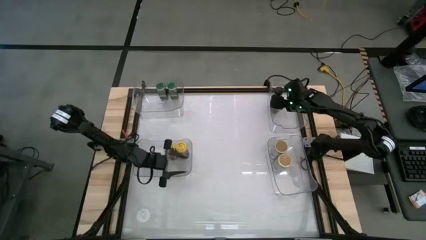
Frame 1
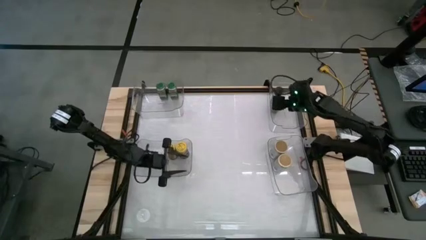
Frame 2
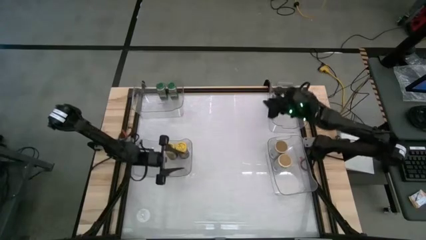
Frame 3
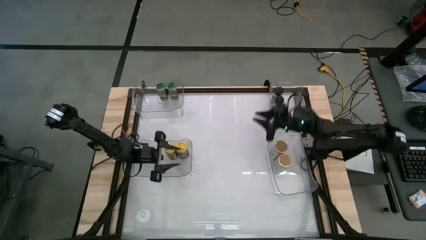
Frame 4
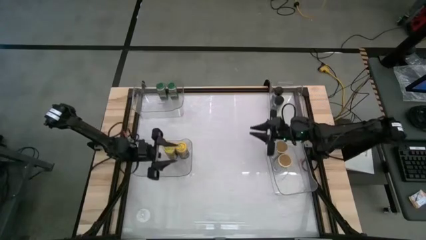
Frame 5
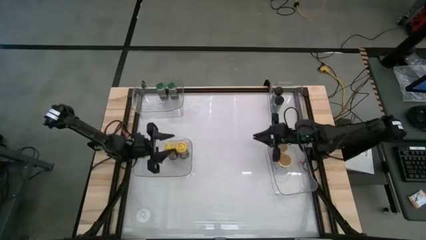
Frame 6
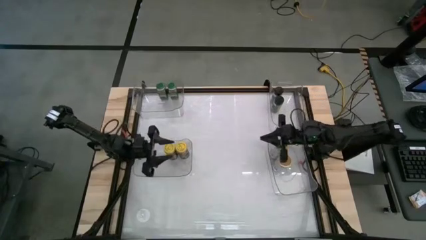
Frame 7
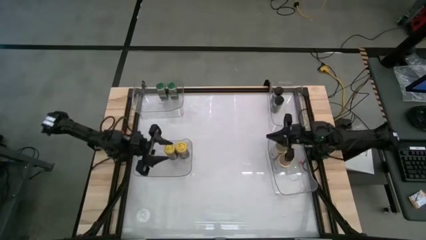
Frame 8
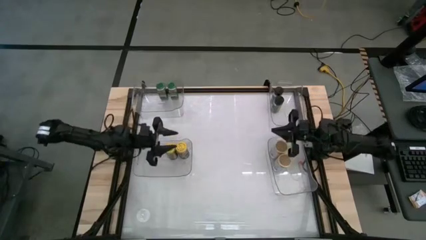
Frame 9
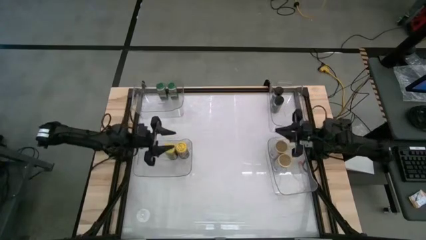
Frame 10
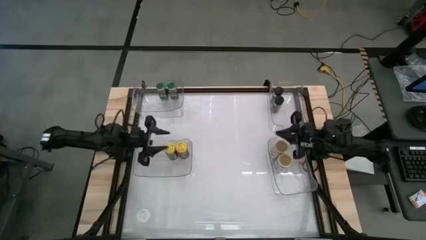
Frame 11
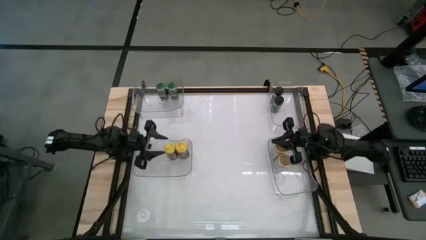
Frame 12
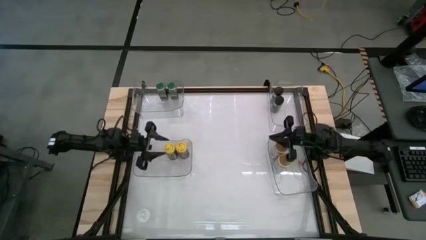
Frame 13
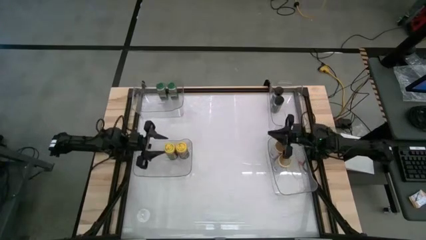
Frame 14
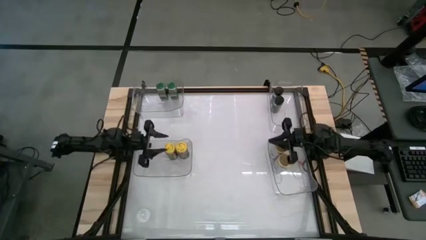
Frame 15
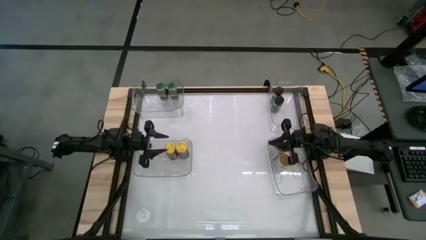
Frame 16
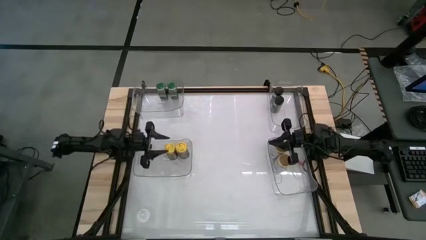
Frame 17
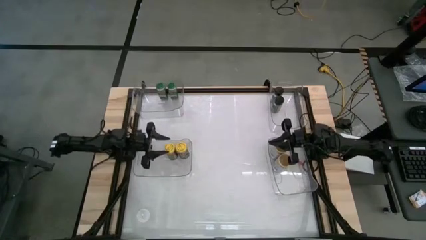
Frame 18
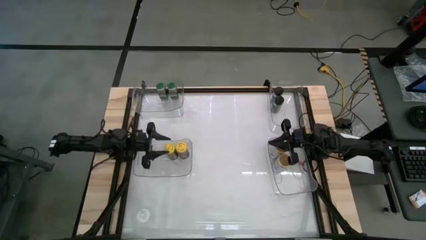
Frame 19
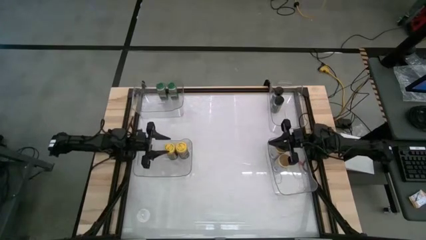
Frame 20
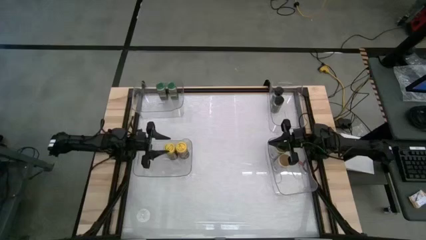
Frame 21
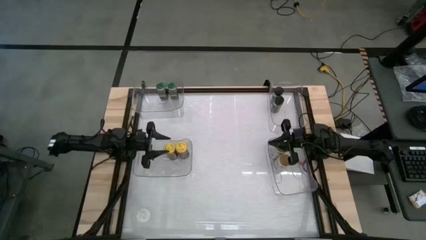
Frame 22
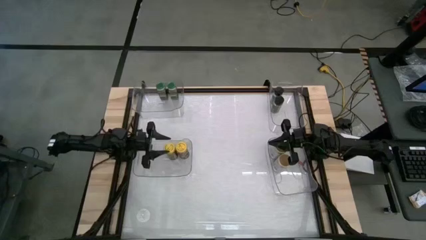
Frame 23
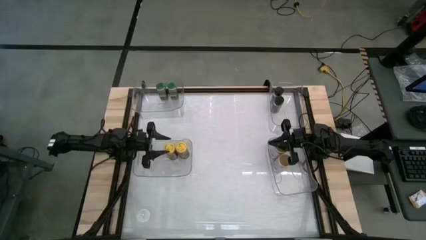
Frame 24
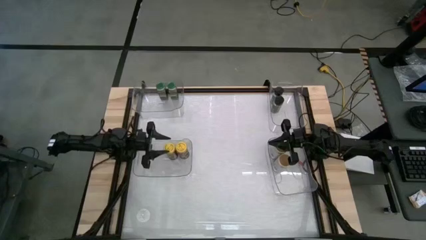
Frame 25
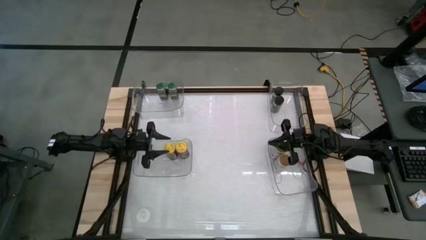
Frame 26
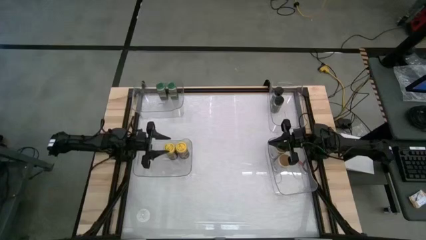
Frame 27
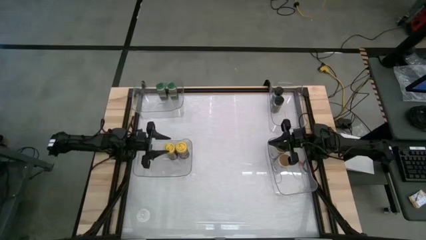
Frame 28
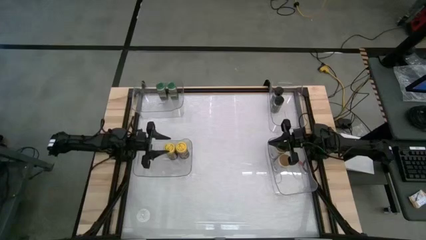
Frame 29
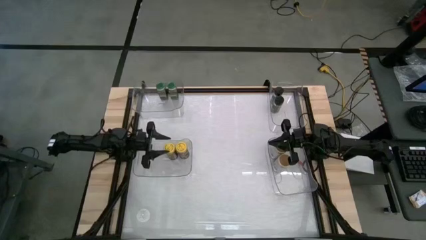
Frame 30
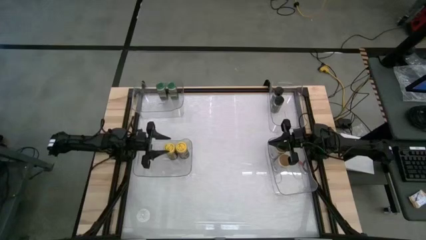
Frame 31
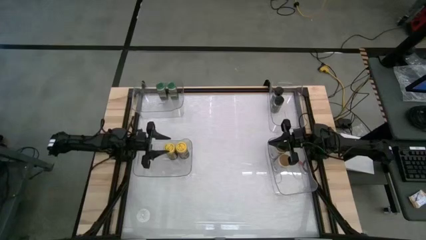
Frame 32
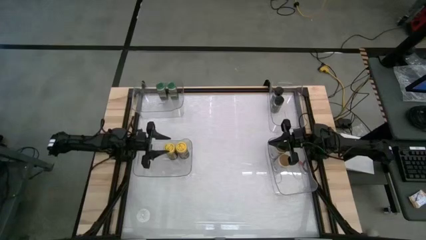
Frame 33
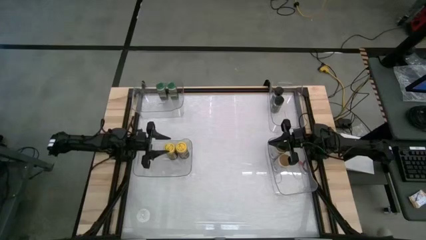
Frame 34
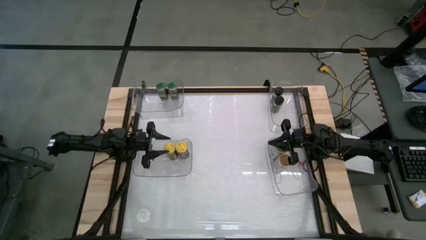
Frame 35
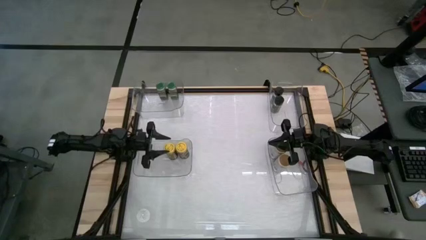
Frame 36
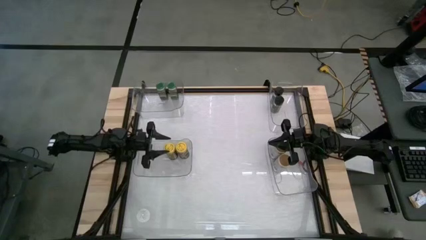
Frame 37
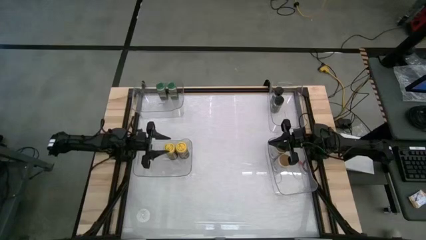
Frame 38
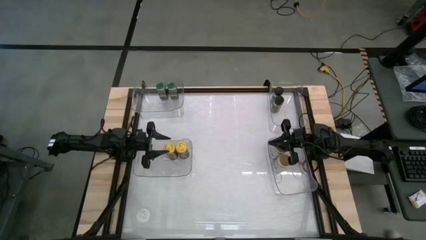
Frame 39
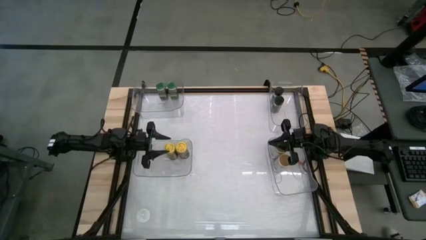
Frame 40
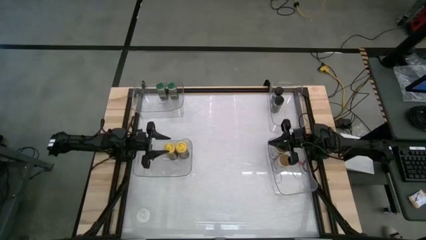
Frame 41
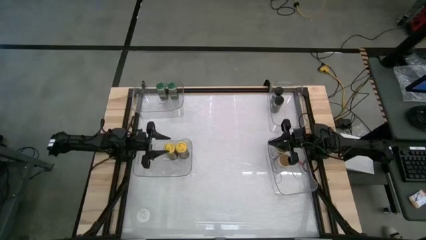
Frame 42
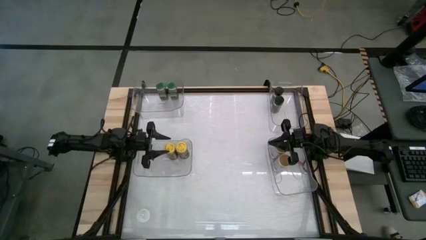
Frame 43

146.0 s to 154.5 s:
Task: Sort spices by type
Return to Home Position

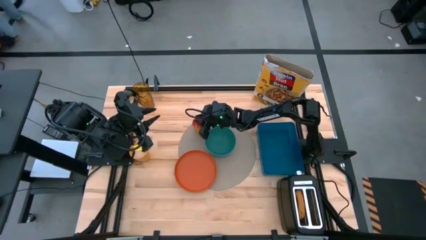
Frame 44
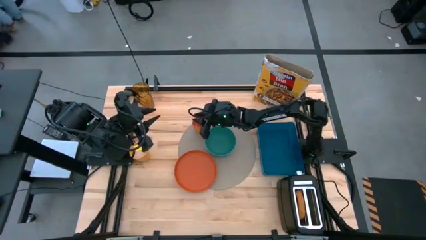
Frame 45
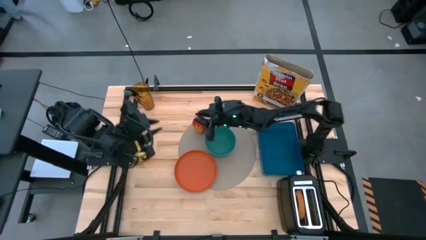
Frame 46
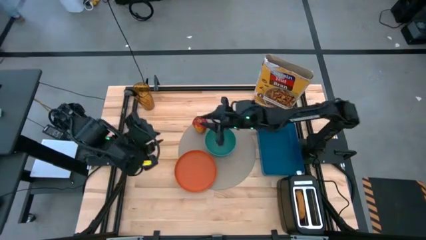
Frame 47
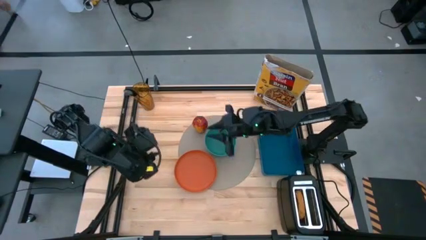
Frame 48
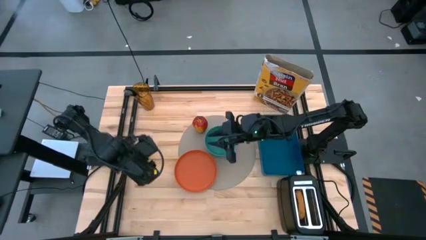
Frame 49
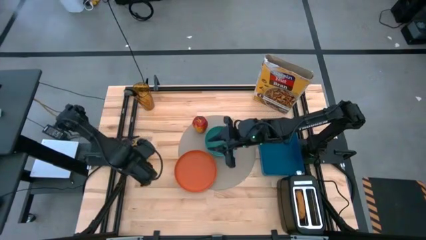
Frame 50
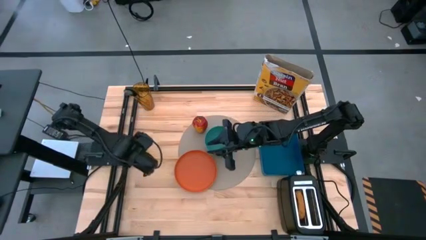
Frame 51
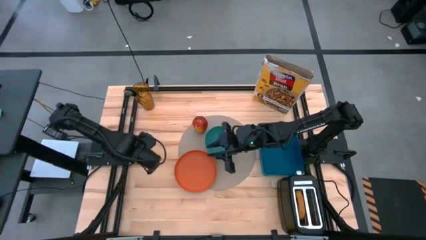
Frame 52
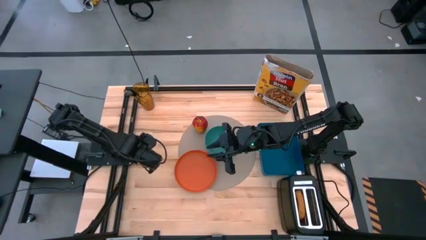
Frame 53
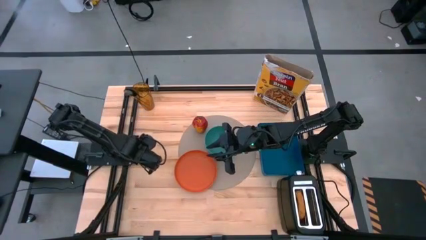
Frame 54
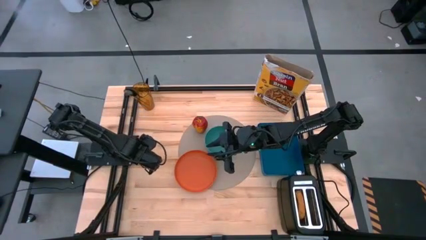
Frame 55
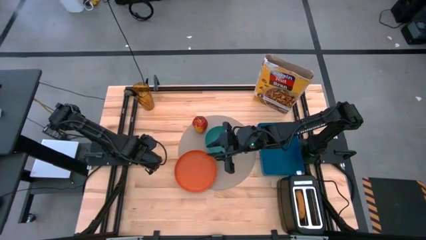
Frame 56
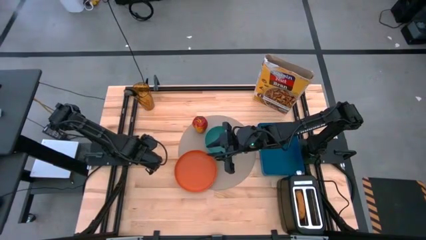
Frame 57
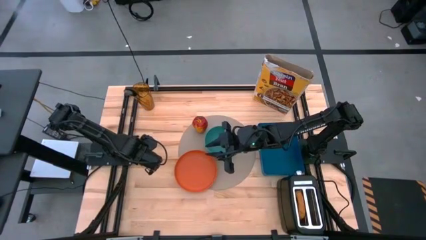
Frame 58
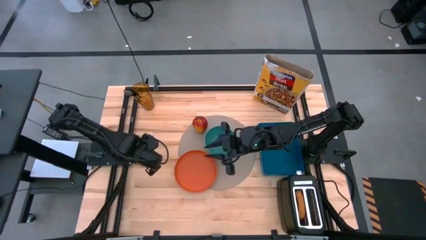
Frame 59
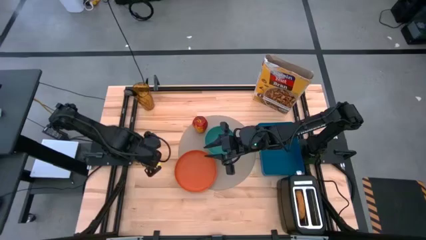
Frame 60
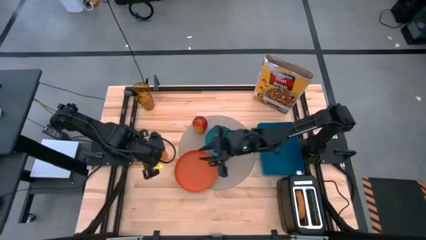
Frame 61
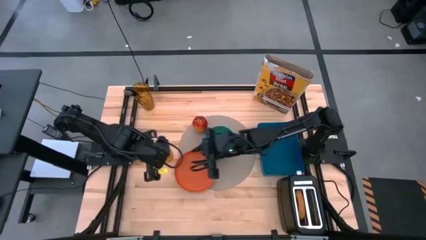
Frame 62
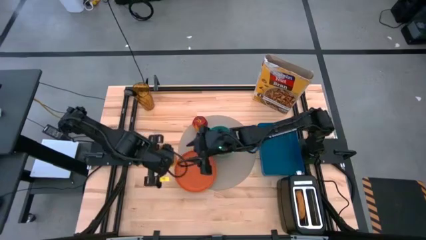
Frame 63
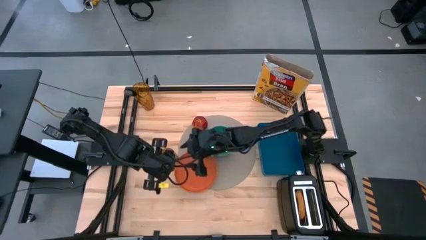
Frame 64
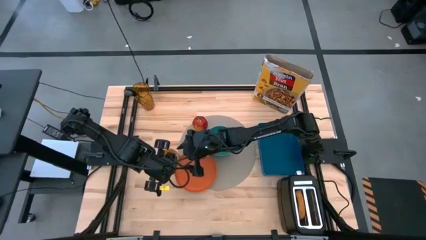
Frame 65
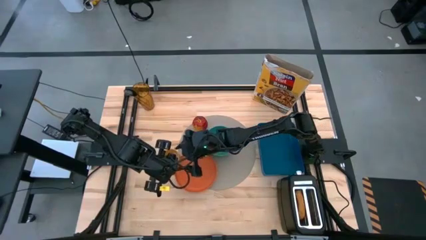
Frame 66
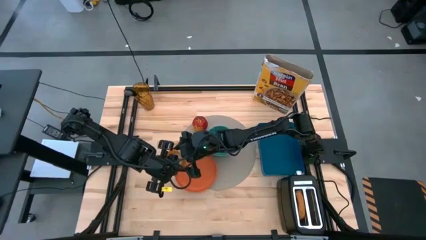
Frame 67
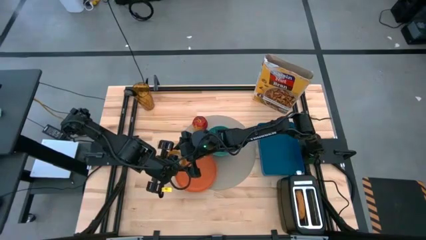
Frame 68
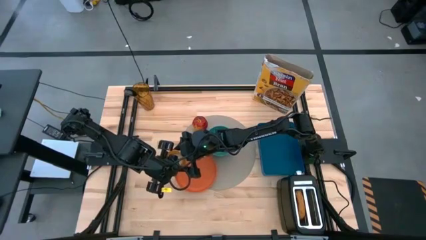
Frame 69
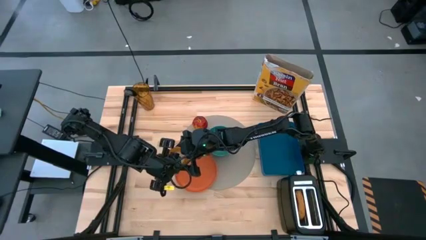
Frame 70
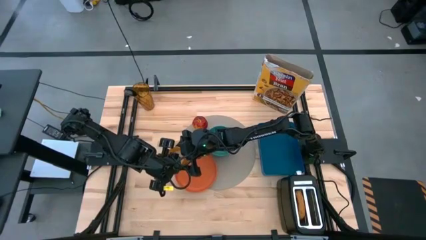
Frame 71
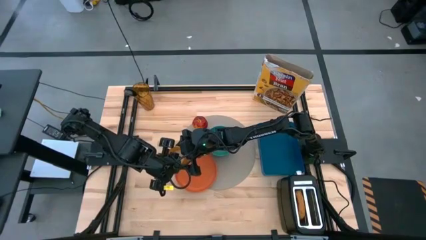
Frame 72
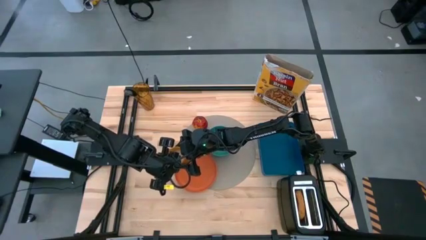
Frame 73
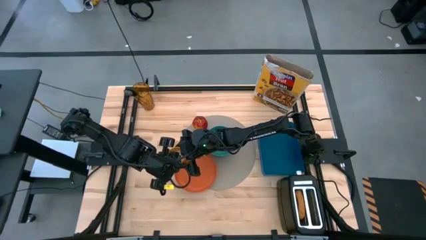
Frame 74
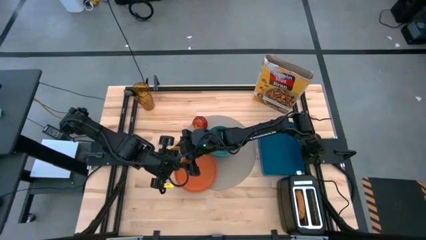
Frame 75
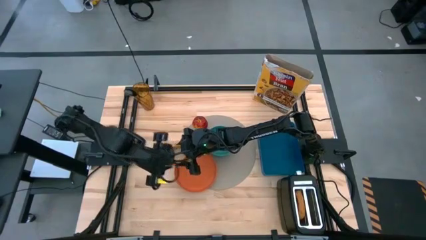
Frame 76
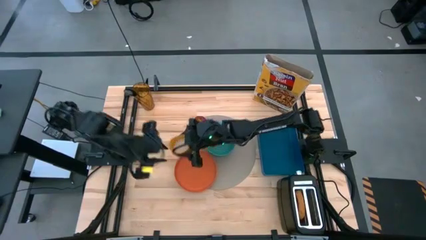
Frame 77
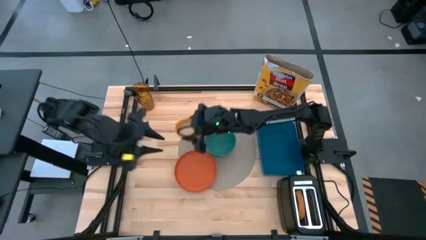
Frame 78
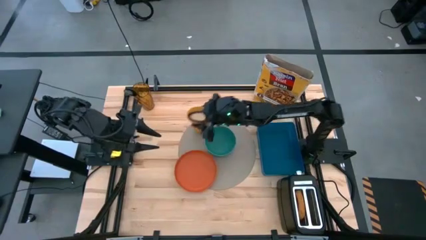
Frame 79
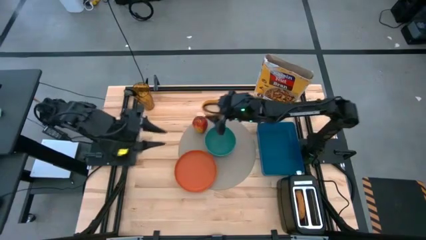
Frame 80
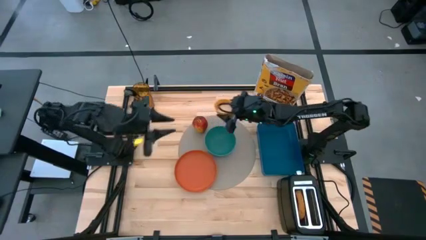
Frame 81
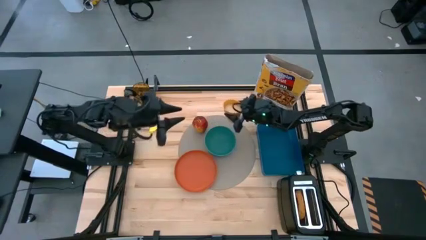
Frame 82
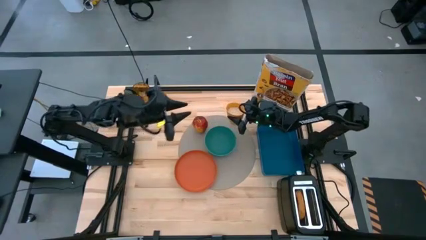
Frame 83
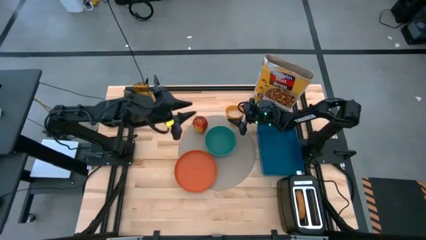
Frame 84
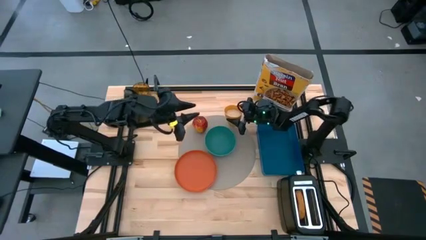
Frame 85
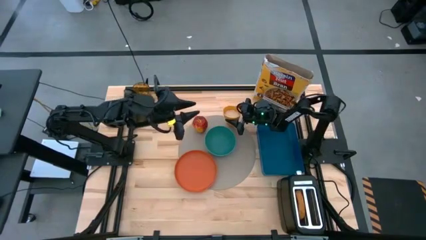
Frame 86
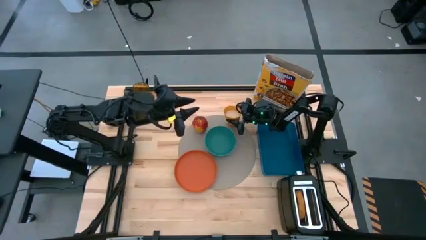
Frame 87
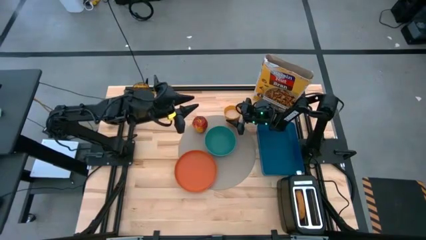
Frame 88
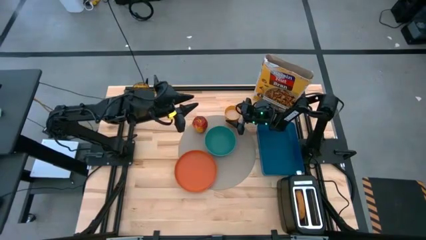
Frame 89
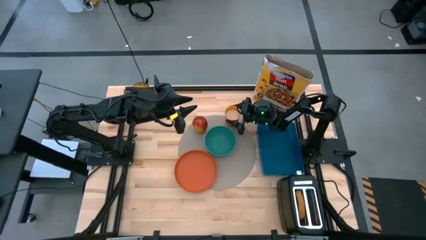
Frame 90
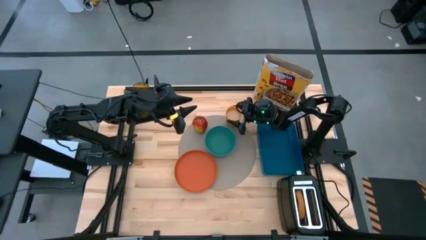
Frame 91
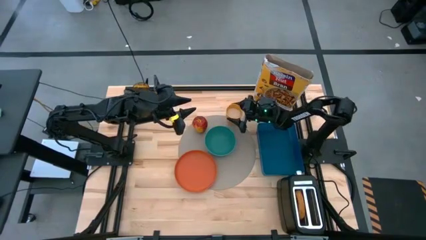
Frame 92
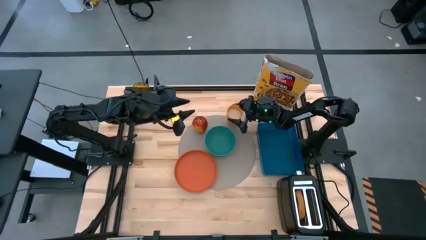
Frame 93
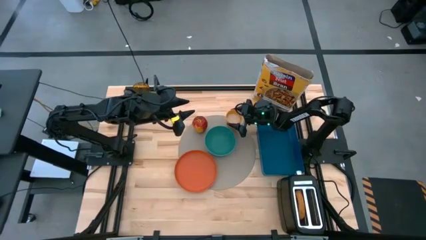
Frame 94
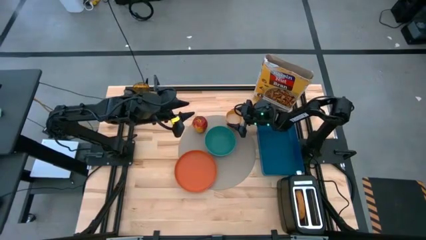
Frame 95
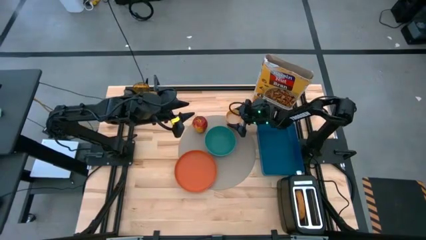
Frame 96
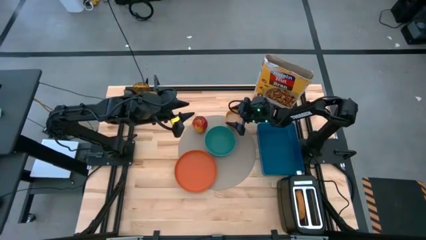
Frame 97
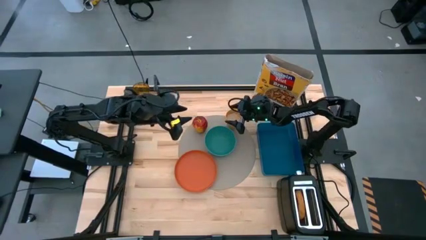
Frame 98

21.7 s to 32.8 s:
Task: Arrange a breakfast setting
Put the yellow cup with rice to the top right of the green bowl on the brown table mat
